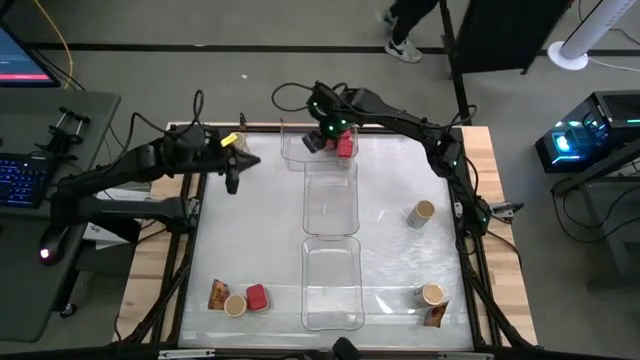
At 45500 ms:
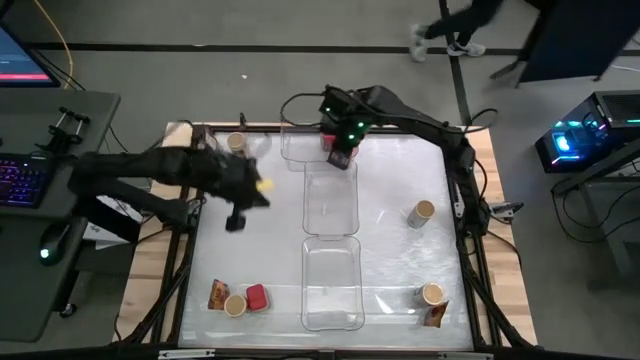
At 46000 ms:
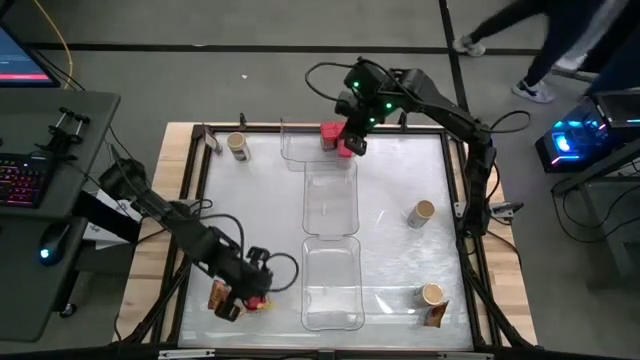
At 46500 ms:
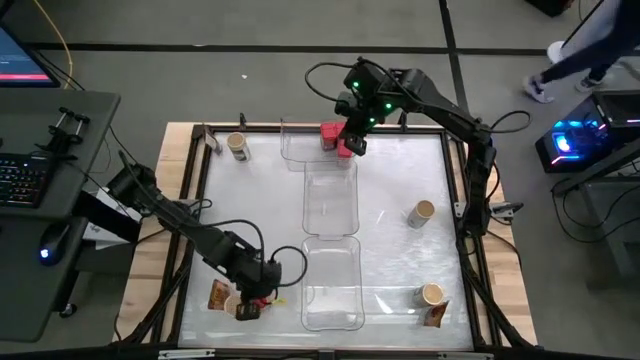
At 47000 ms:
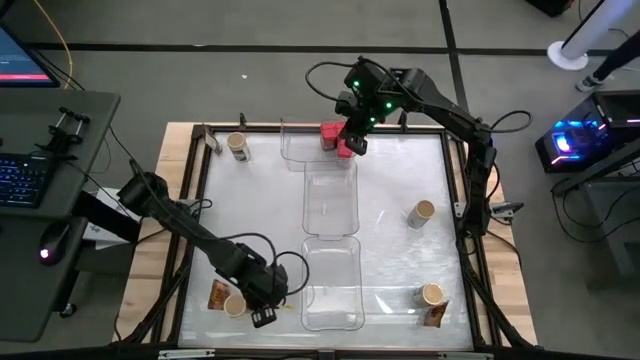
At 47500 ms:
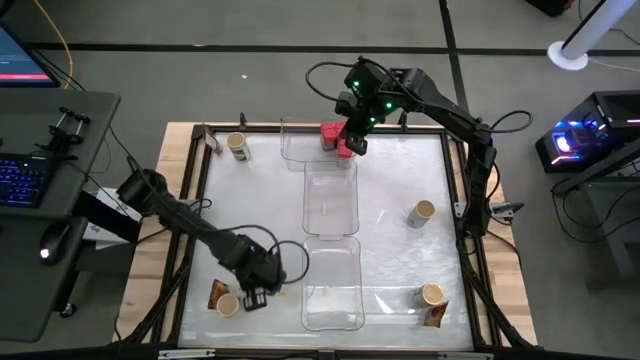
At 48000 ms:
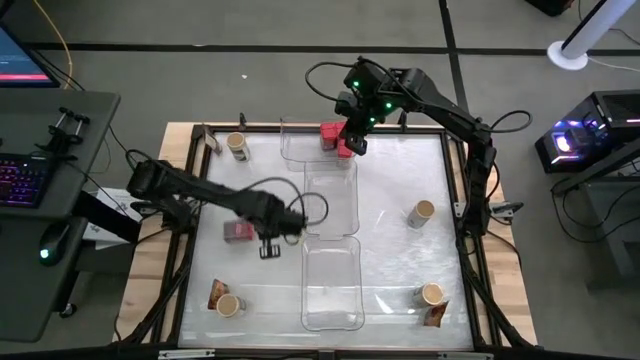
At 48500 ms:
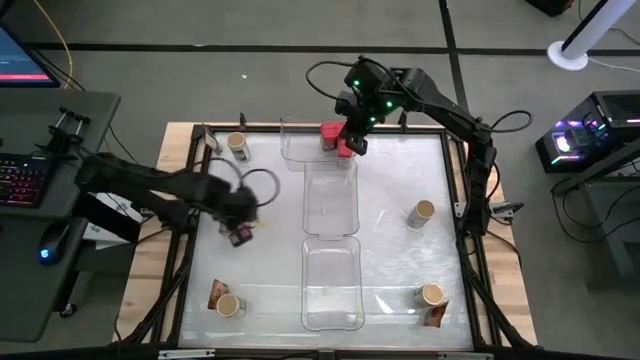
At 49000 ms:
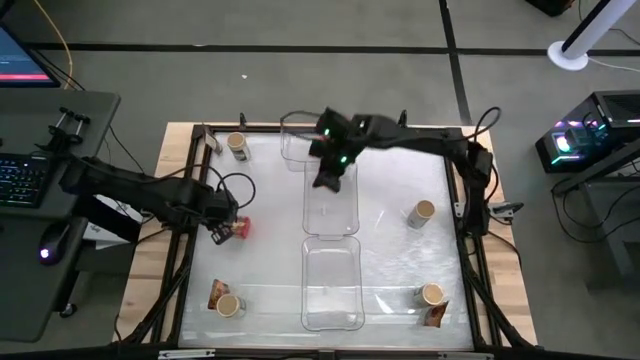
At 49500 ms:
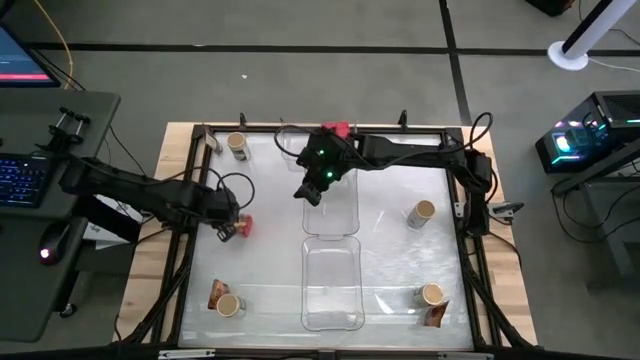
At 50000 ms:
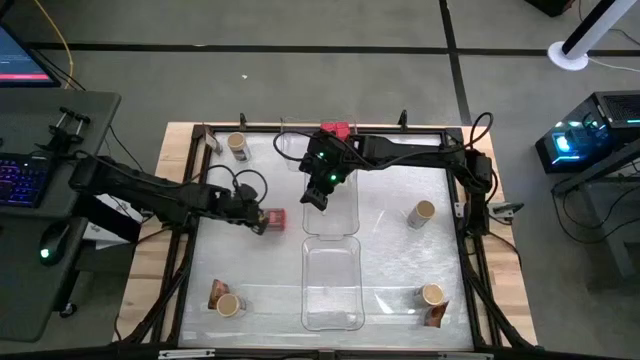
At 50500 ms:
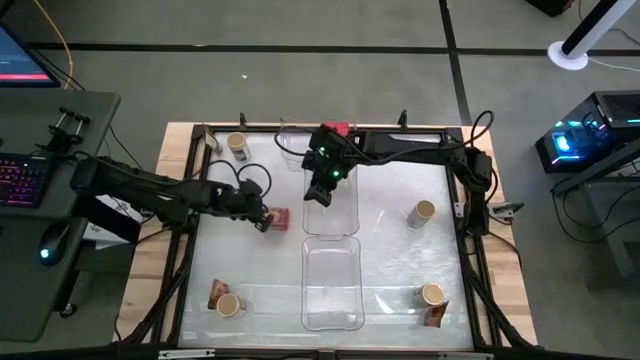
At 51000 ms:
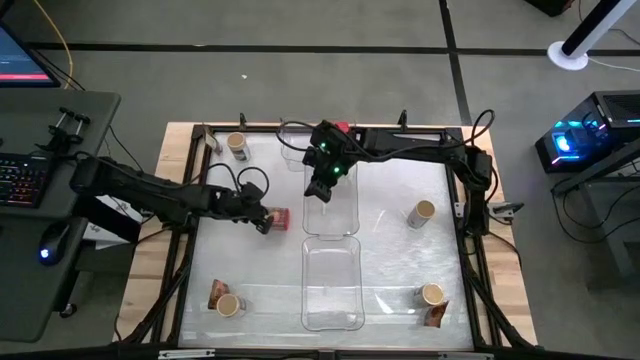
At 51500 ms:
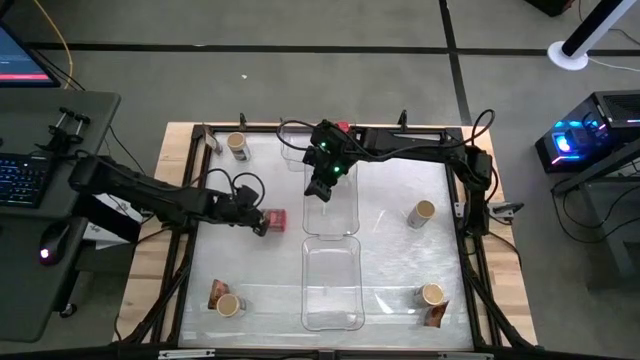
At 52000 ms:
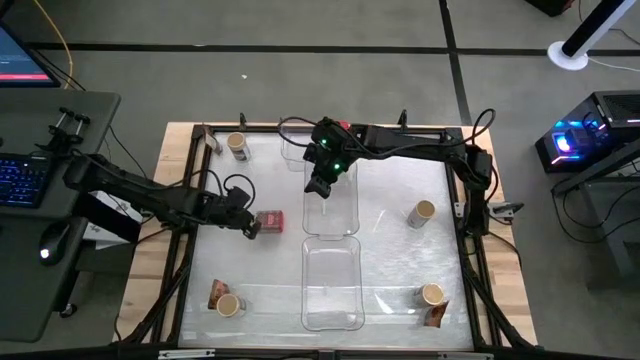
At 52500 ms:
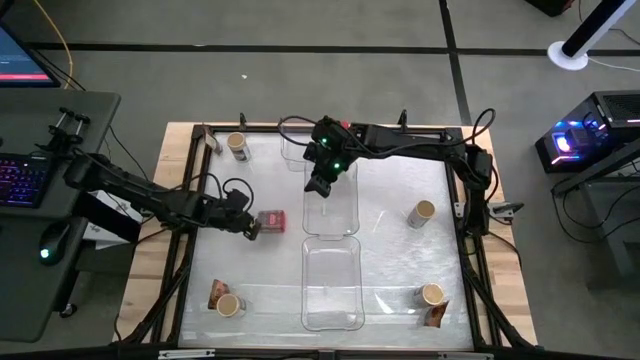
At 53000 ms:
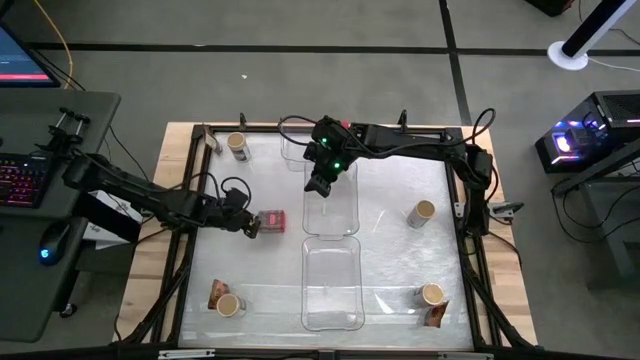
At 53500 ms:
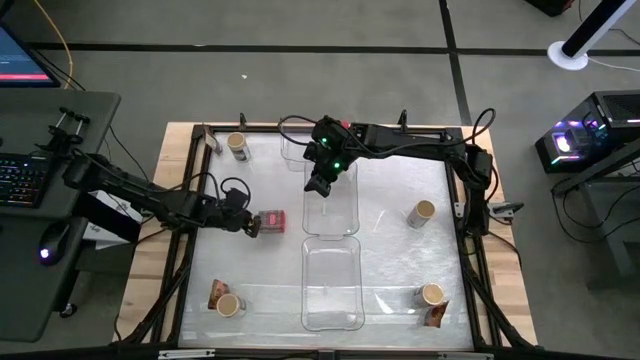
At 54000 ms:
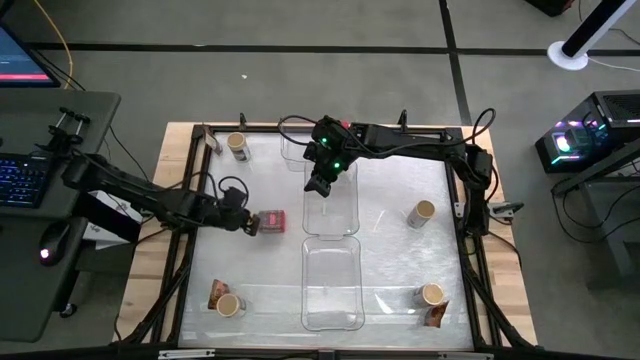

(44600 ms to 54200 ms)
Task: Sort spices by type
Put the red seasoning can into the top transparent bin

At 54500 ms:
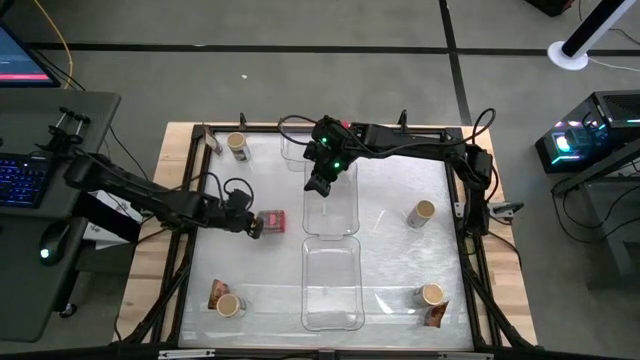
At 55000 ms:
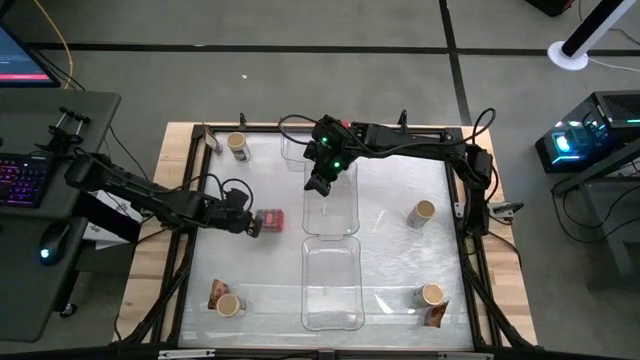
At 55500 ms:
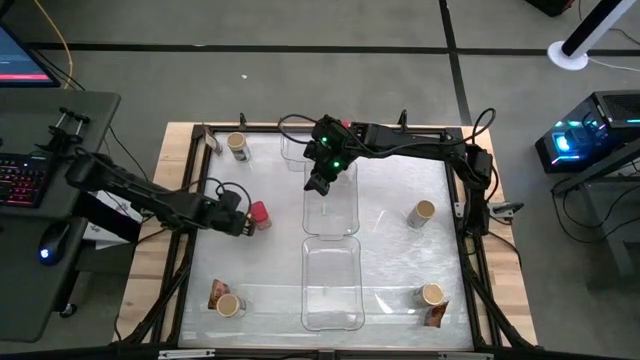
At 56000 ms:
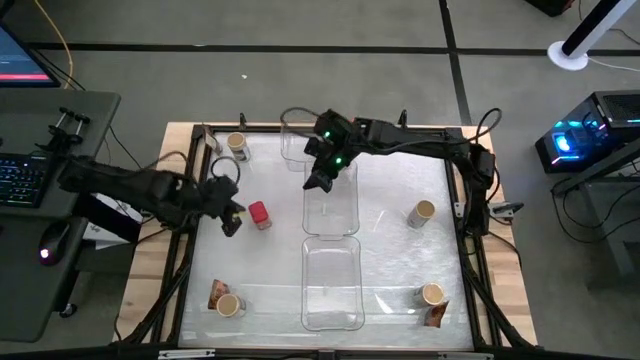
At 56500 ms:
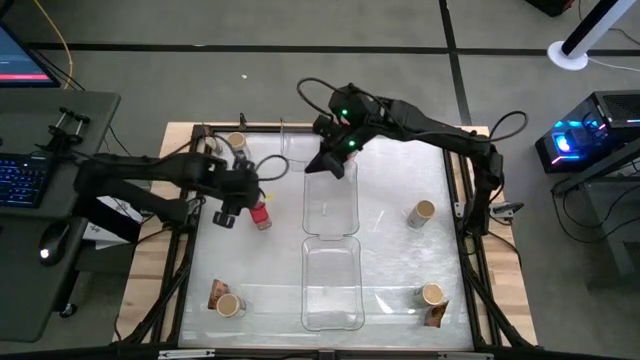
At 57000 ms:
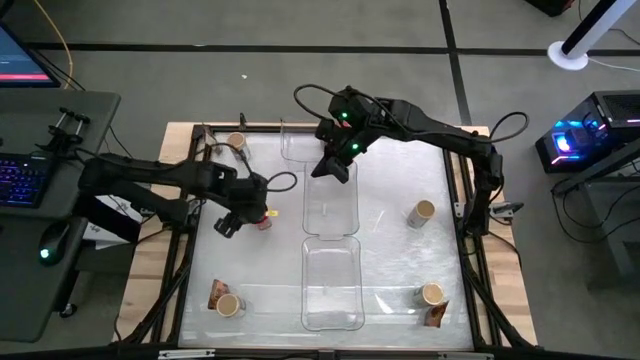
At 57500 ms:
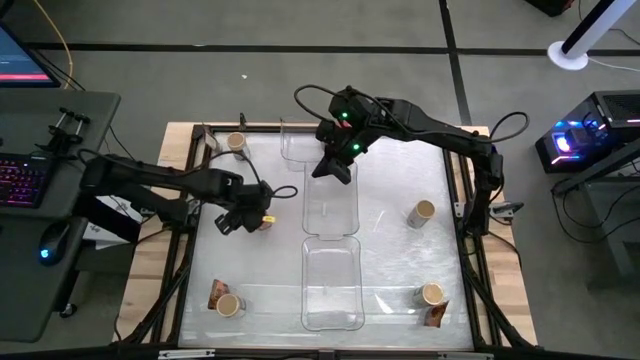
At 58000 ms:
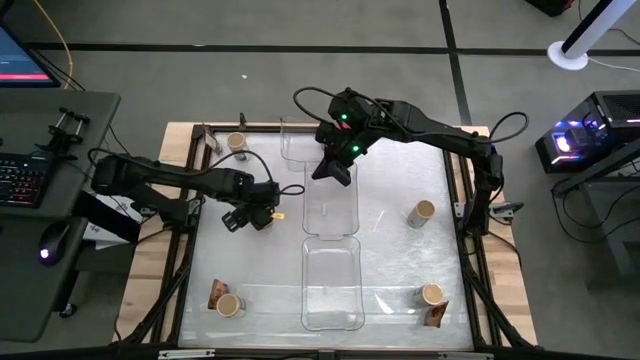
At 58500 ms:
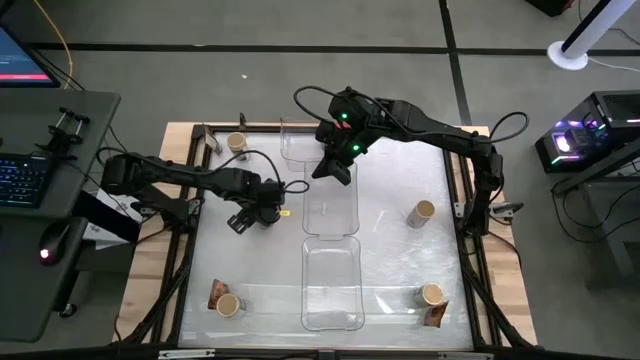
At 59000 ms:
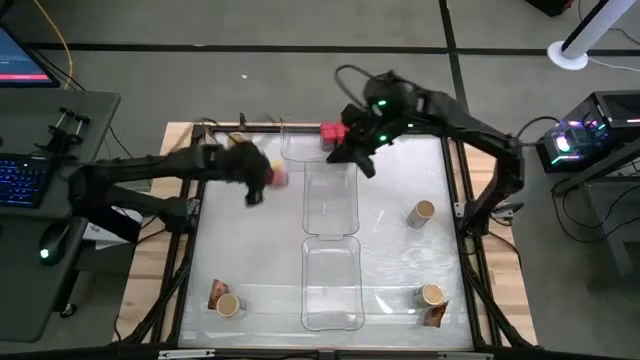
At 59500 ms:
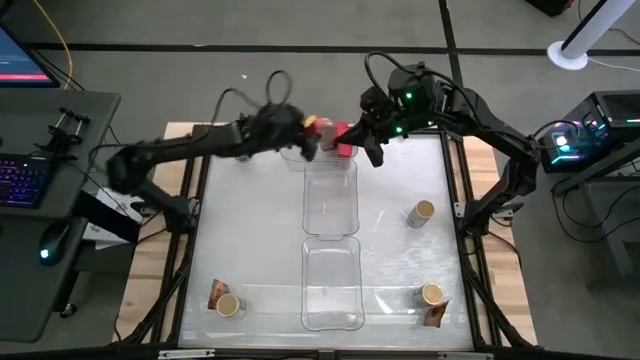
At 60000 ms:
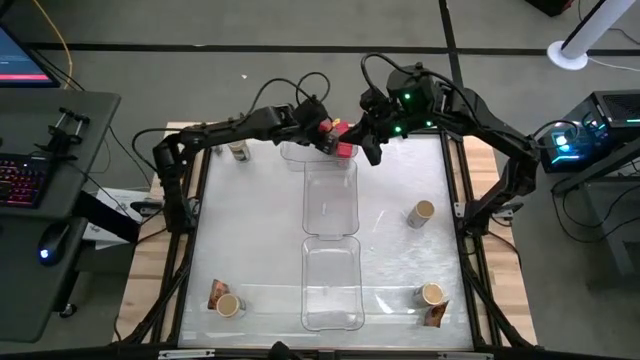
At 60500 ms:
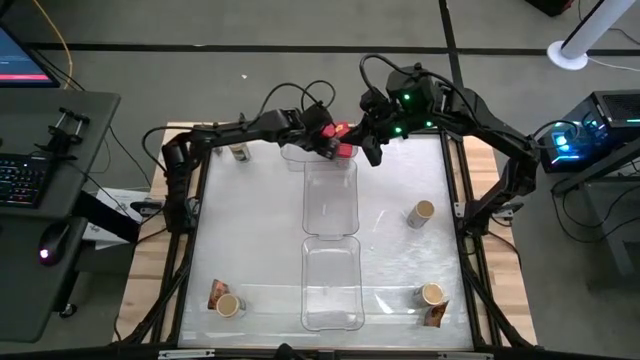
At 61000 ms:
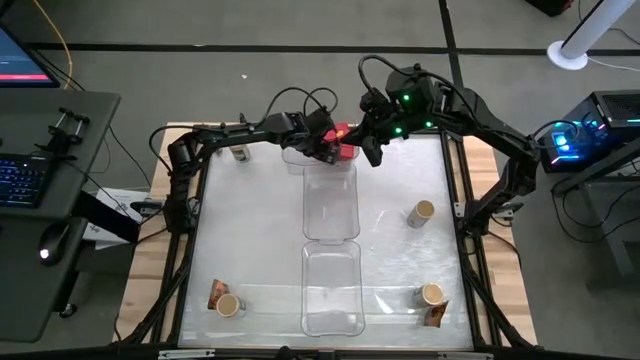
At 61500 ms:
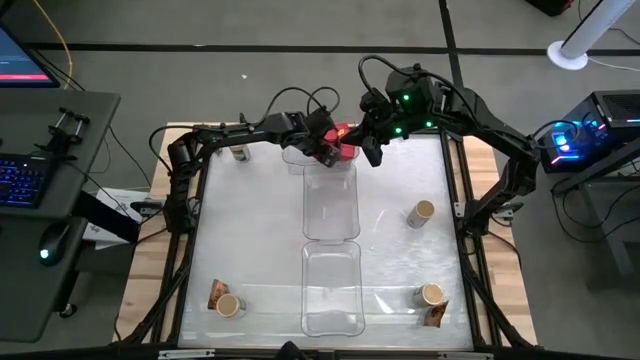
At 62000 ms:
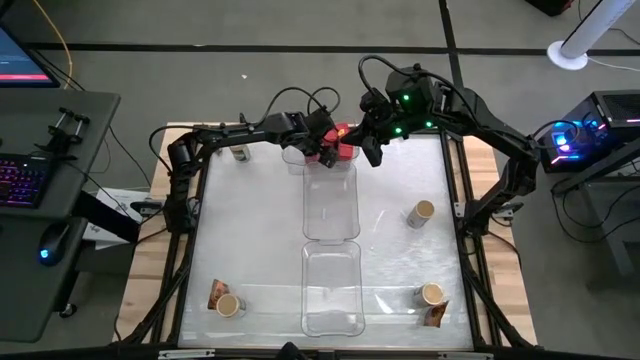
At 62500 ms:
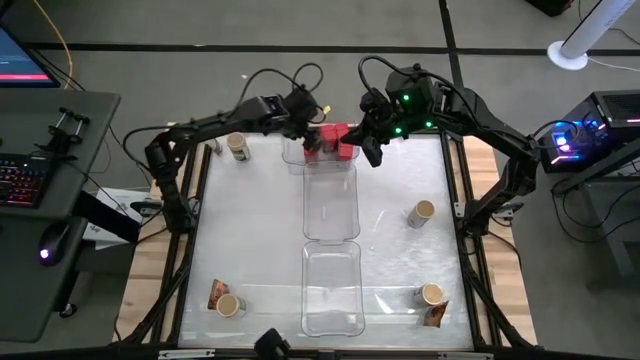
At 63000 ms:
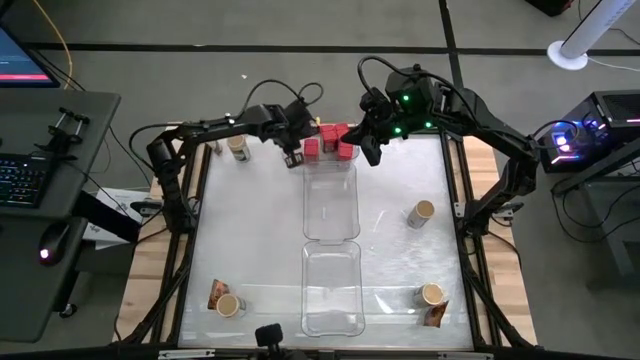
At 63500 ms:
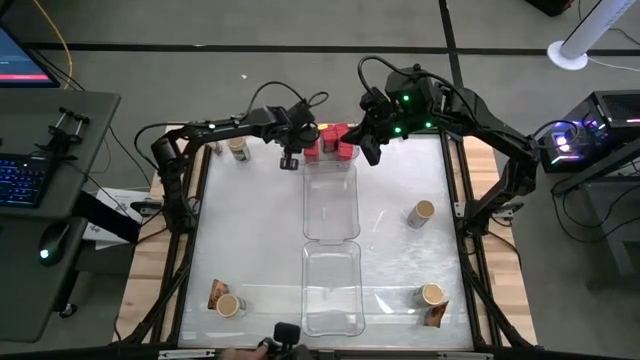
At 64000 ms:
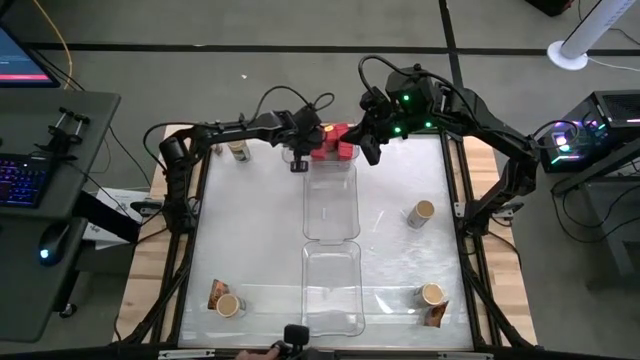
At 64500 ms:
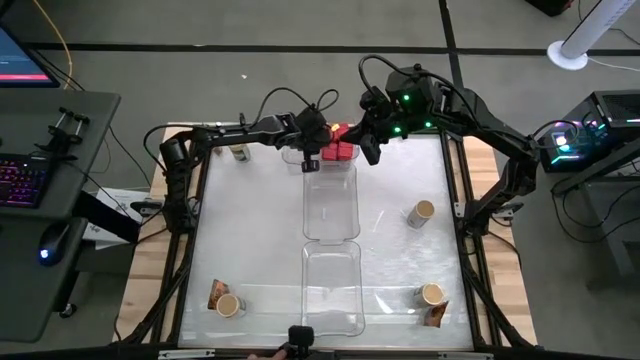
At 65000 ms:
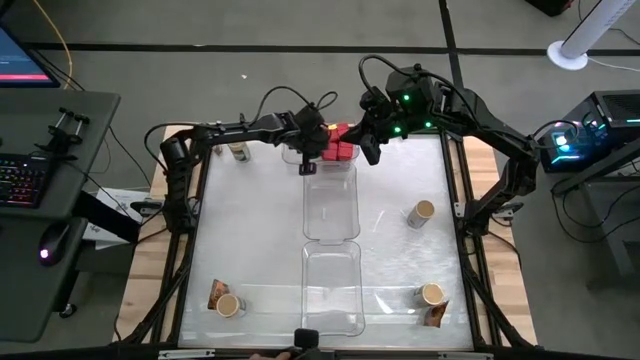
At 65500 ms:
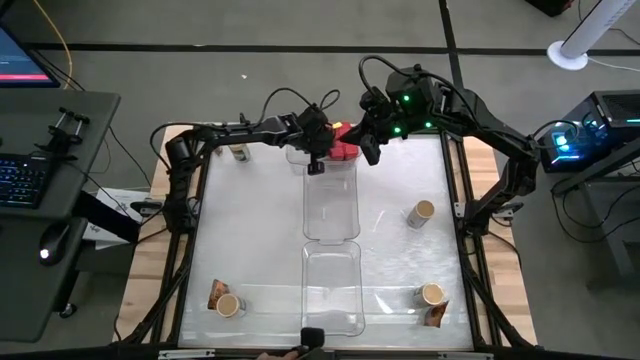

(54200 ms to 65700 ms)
Put the red seasoning can into the top transparent bin

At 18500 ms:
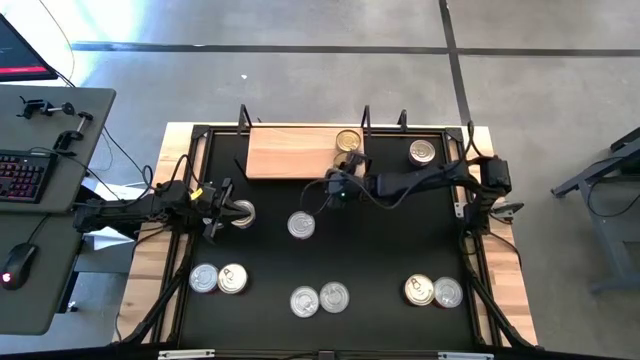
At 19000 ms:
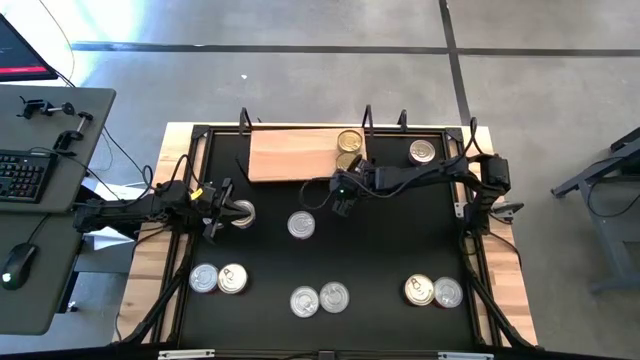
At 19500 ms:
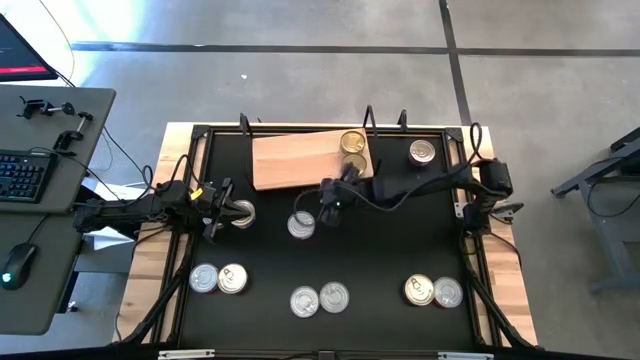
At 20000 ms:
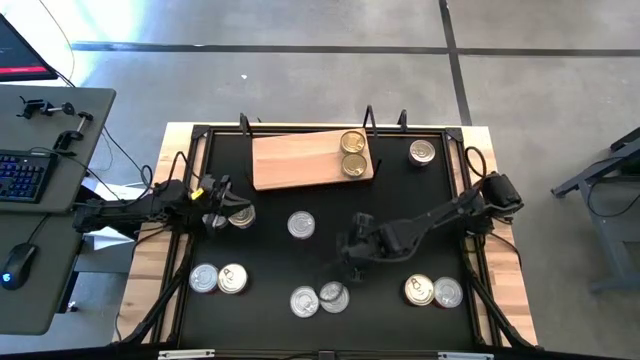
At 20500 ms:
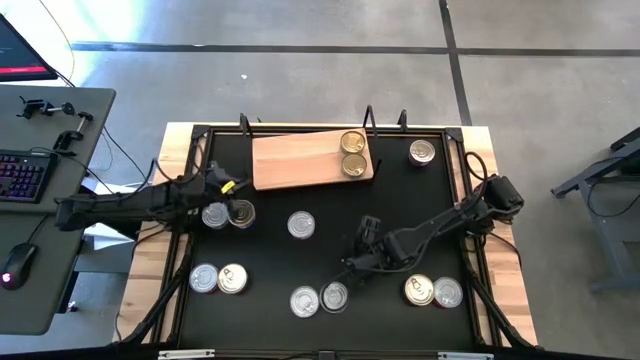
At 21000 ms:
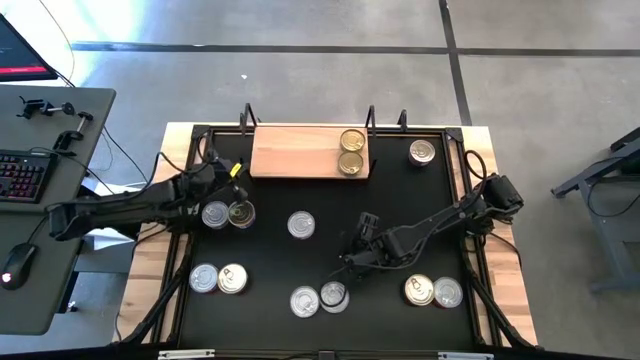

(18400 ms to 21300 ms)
Task: Stack canned seafood by type on shelf
Adjust the shelf on the table
